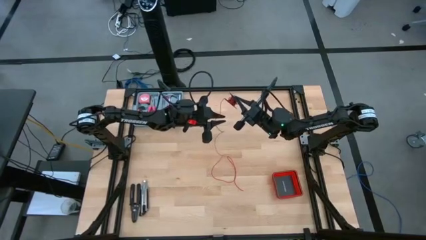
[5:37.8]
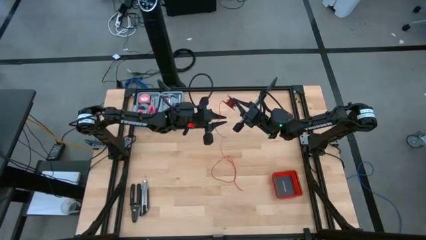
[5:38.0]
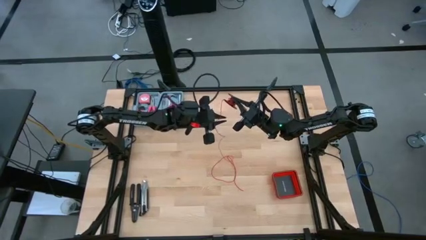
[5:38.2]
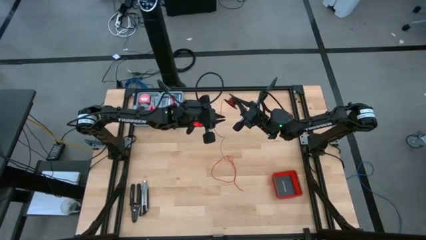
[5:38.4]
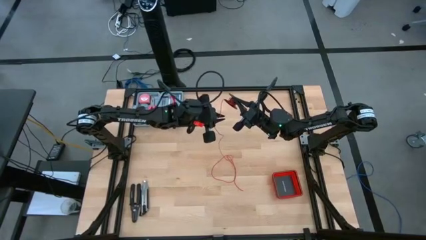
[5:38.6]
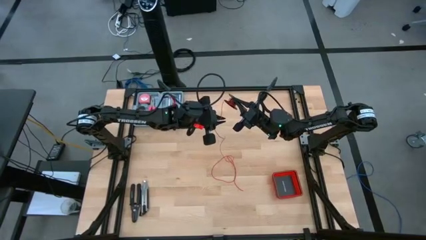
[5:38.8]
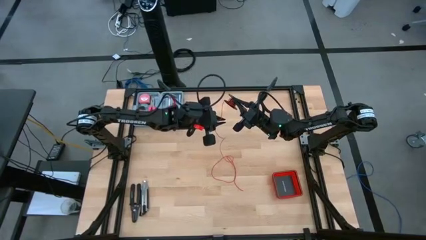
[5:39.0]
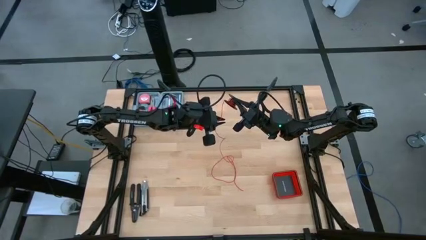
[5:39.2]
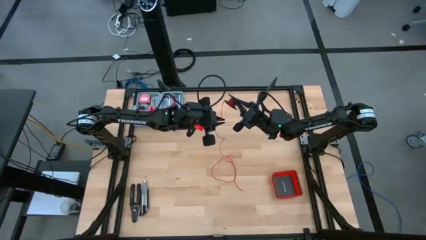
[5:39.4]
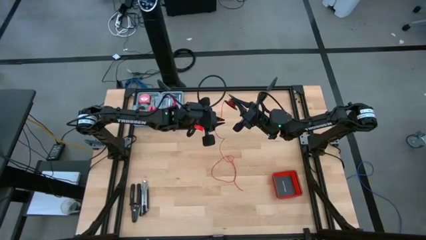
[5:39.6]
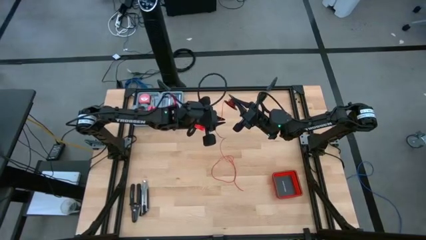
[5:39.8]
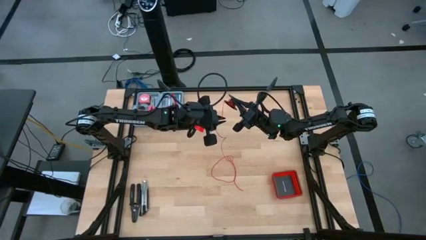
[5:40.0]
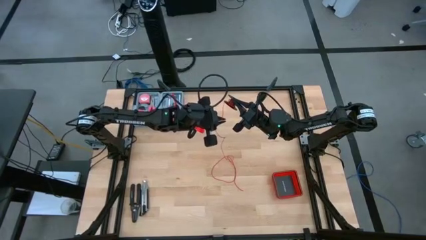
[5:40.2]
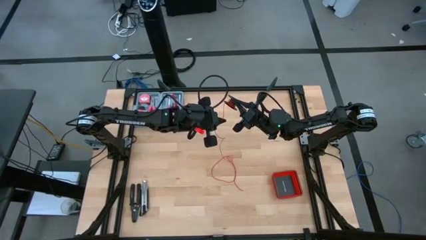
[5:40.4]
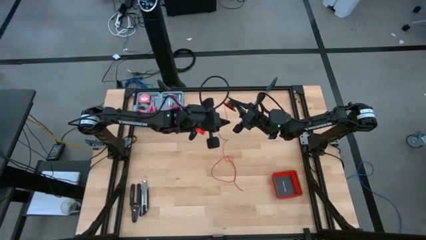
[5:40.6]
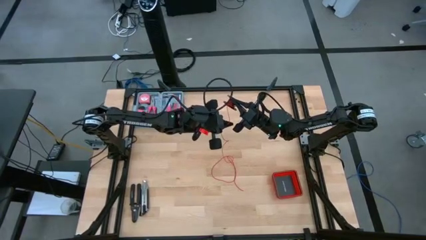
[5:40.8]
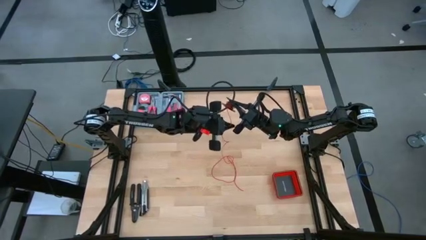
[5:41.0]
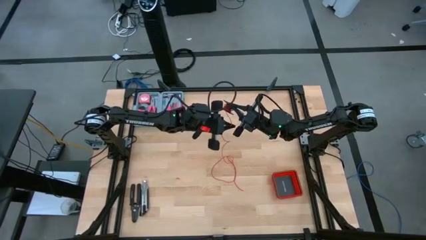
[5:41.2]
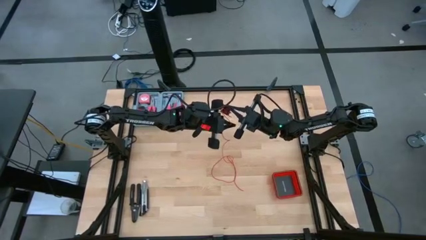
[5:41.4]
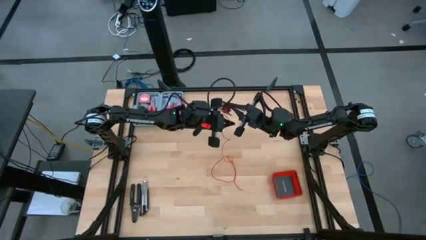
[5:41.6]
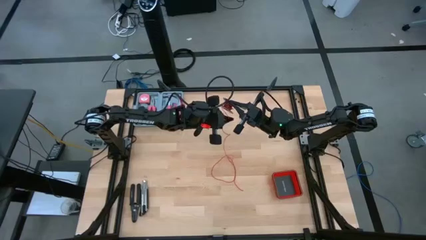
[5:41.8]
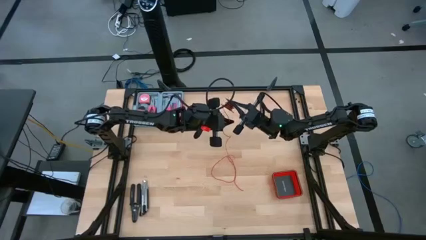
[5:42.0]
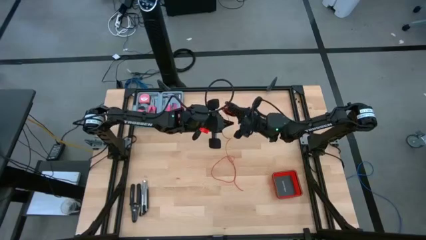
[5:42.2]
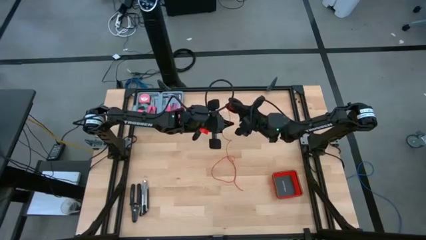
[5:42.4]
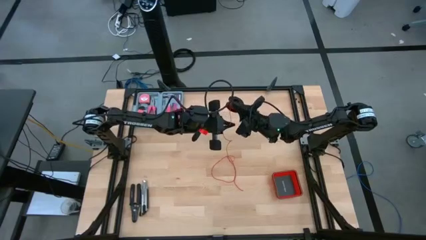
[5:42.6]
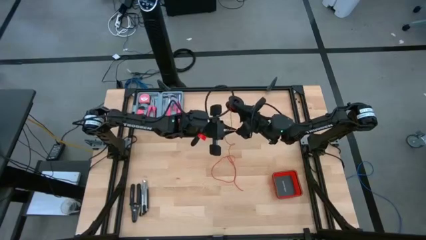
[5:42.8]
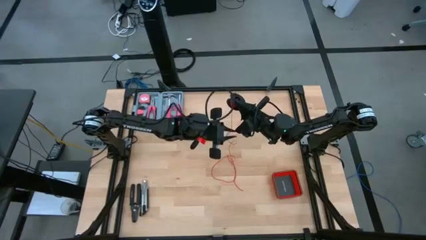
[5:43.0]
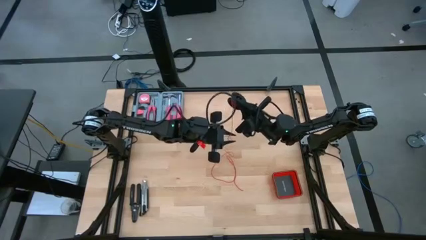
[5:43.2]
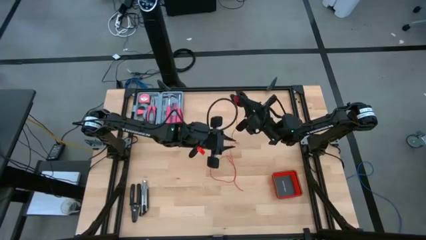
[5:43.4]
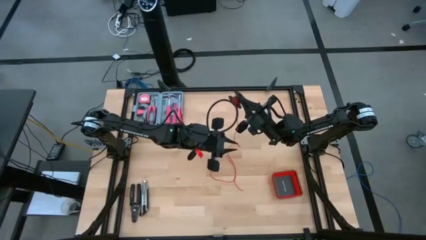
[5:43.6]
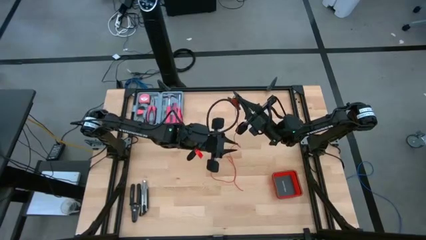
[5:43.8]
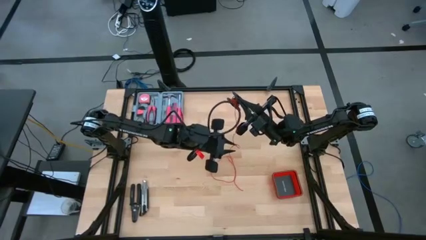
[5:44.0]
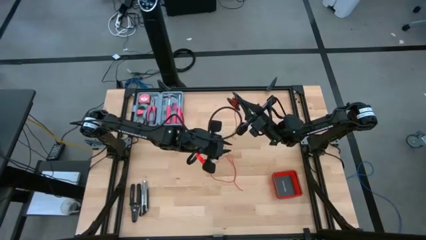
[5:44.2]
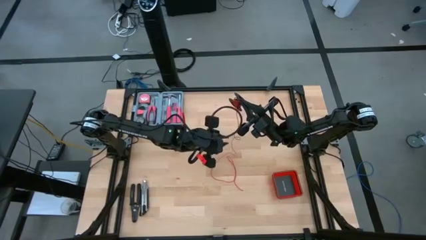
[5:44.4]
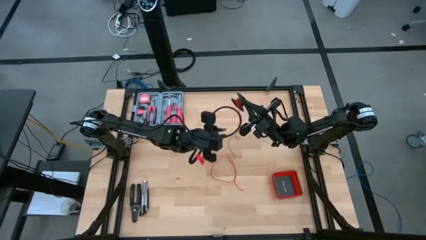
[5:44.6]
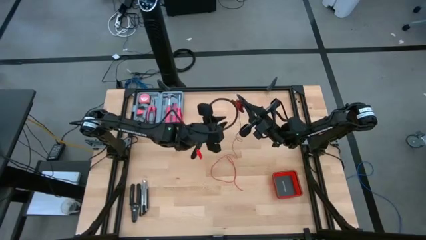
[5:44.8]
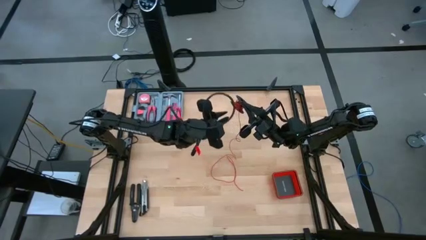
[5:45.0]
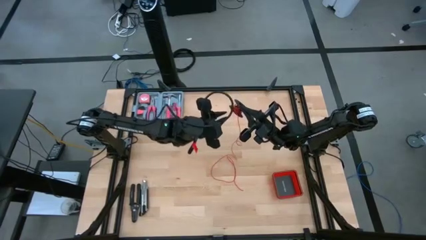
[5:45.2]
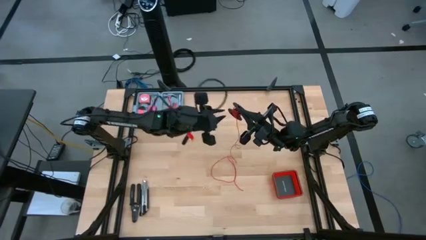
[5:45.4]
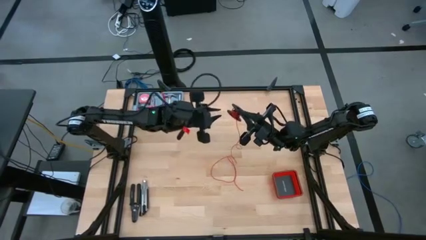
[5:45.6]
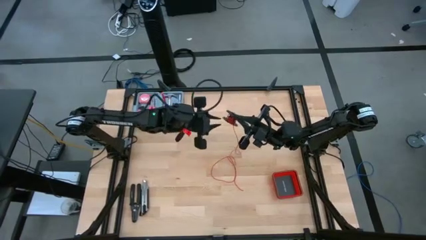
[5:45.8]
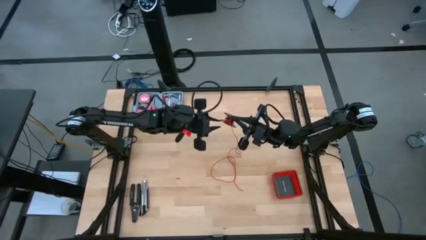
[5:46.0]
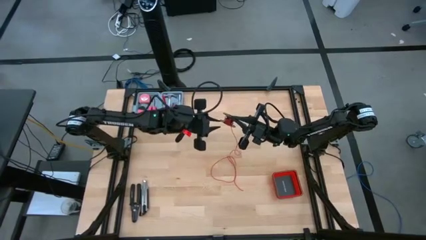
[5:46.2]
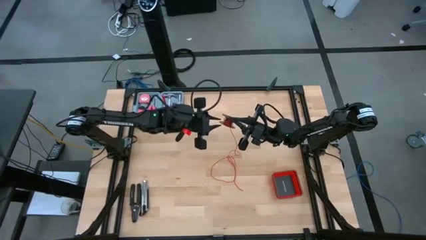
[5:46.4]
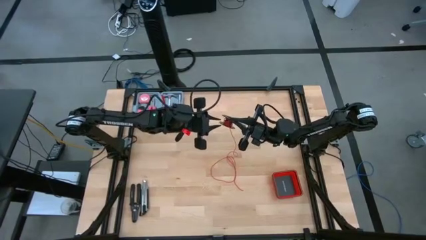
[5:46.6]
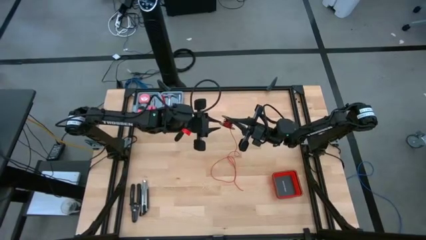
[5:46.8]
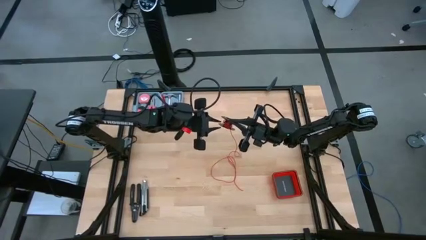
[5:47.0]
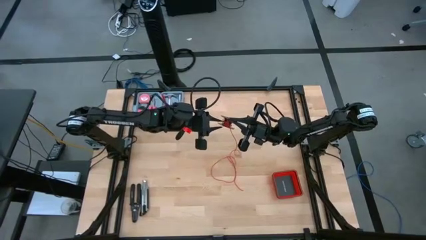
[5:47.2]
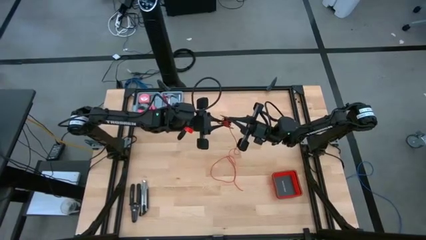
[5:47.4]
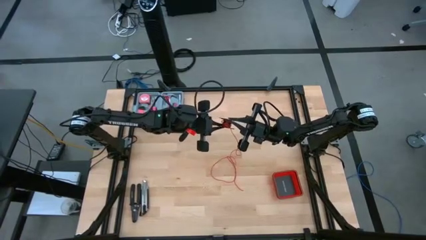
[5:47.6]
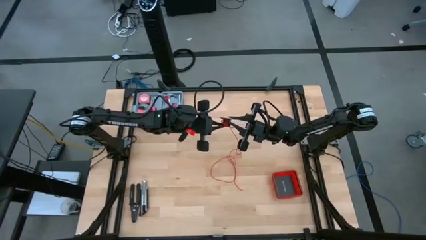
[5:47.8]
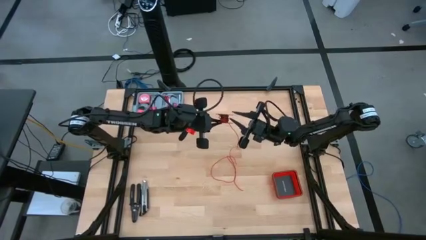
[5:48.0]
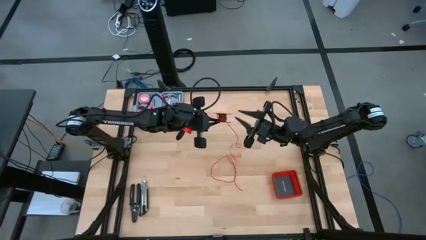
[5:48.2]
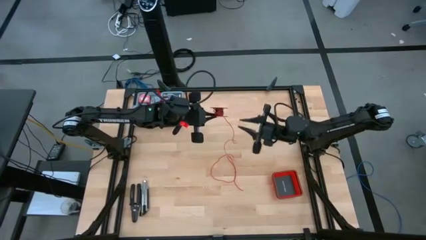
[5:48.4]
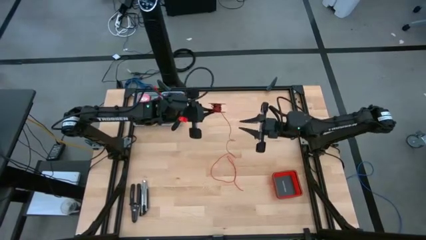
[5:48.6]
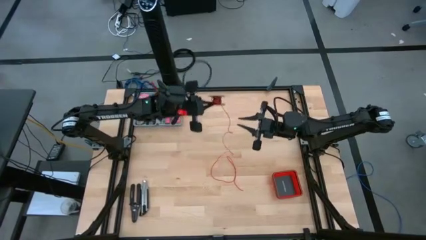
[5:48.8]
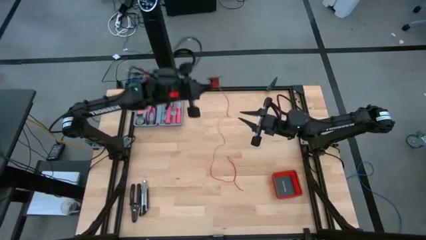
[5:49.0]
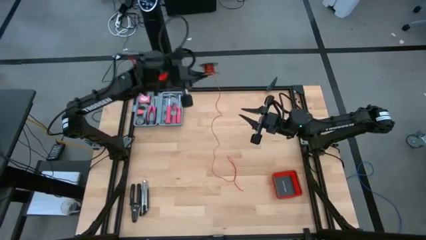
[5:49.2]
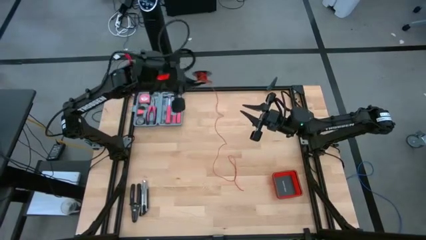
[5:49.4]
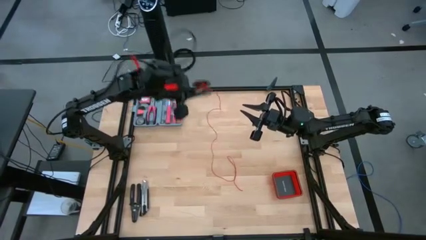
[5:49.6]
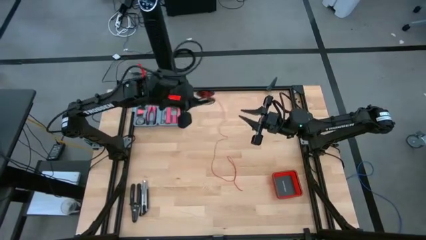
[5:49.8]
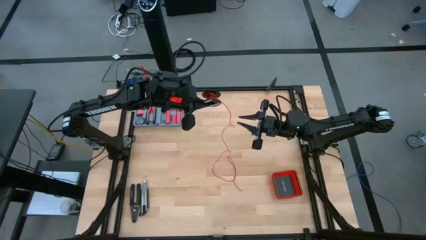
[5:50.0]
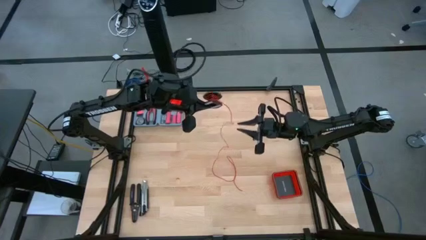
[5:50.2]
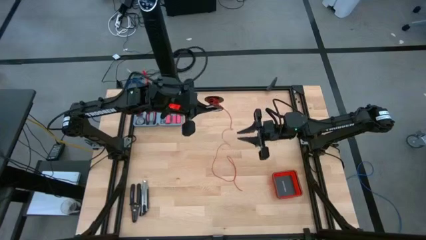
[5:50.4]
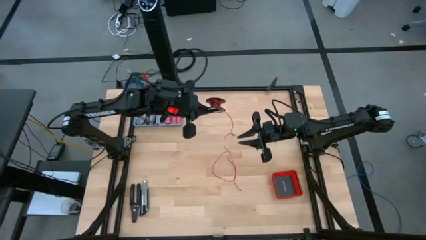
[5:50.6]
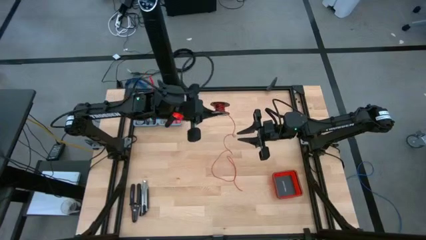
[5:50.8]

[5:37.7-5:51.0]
Task: Coil cords
Coil the red wire onto the spool

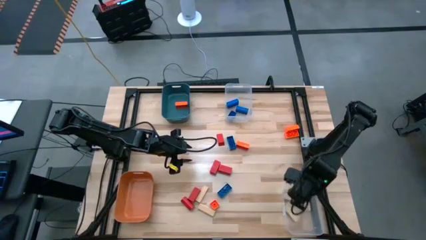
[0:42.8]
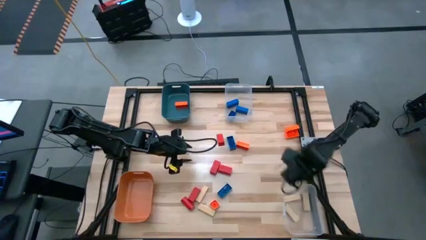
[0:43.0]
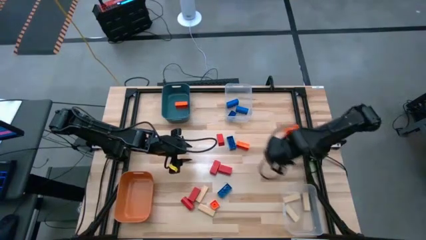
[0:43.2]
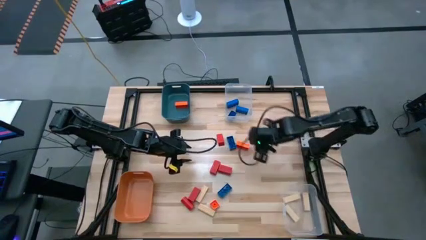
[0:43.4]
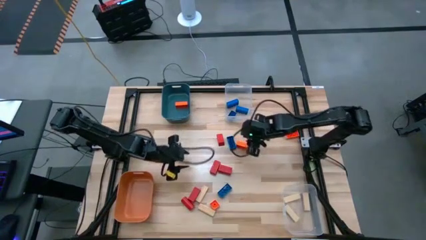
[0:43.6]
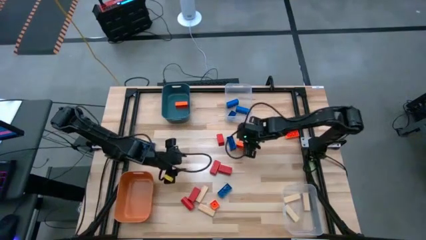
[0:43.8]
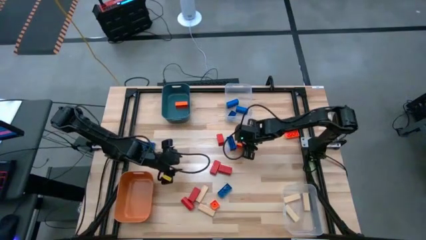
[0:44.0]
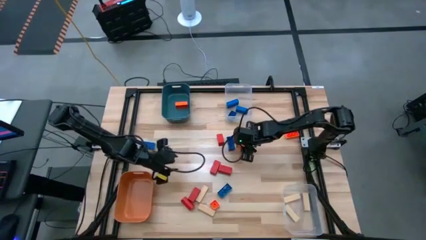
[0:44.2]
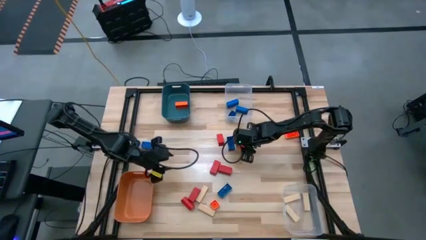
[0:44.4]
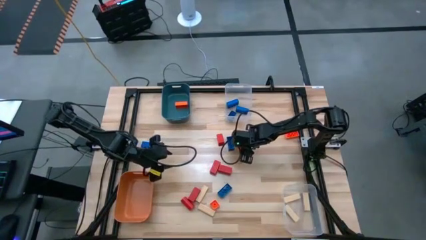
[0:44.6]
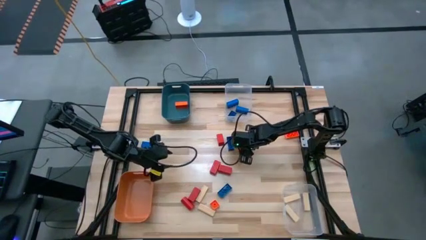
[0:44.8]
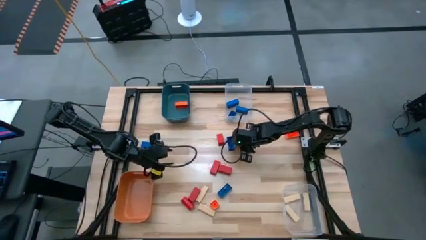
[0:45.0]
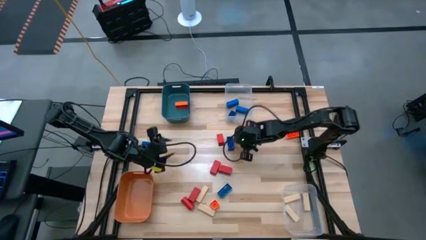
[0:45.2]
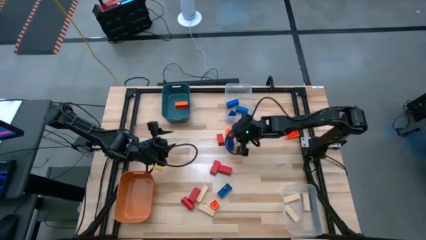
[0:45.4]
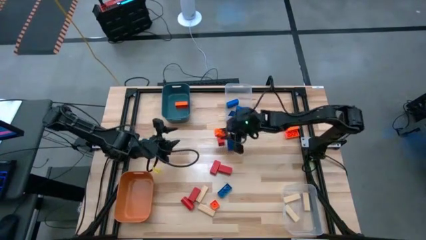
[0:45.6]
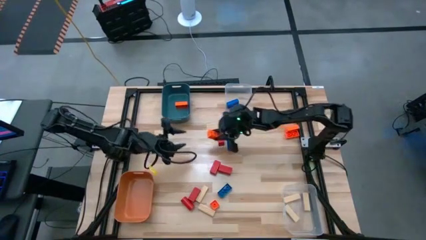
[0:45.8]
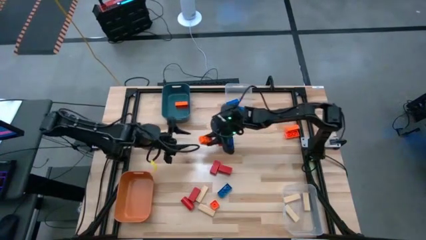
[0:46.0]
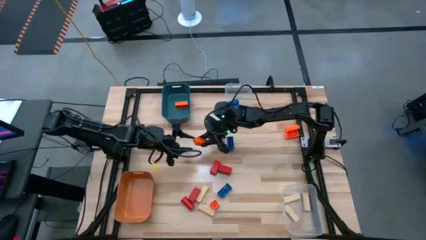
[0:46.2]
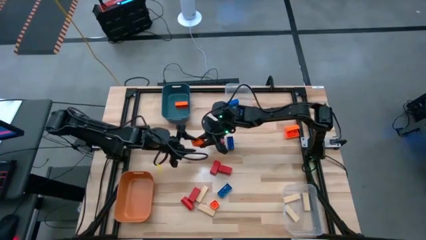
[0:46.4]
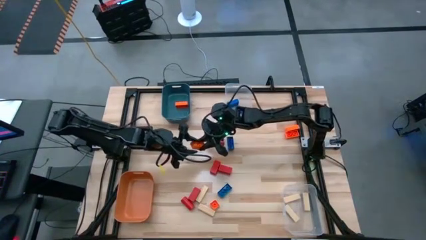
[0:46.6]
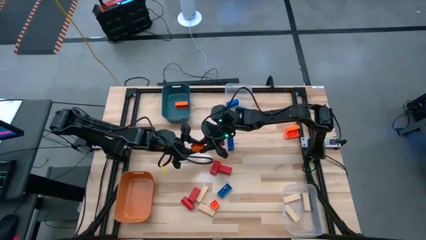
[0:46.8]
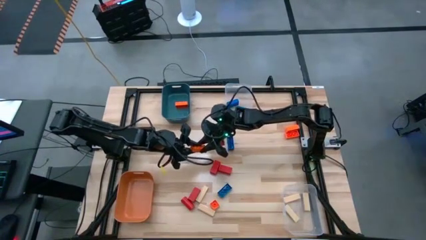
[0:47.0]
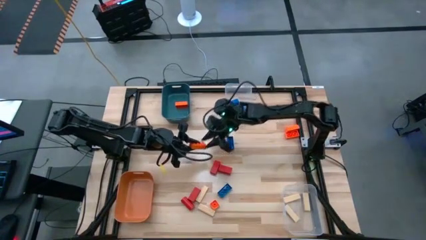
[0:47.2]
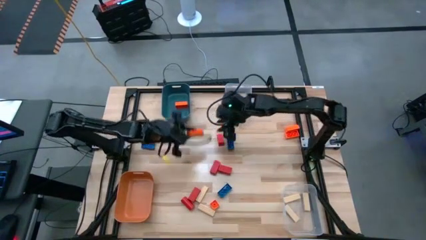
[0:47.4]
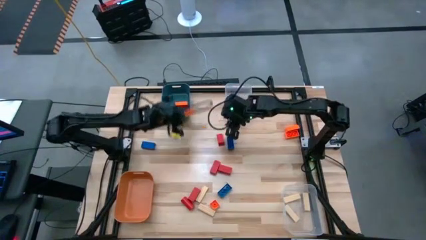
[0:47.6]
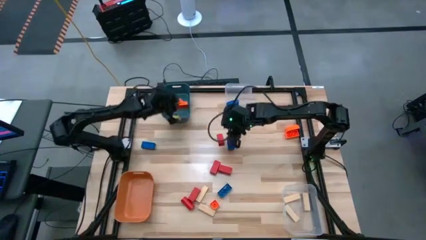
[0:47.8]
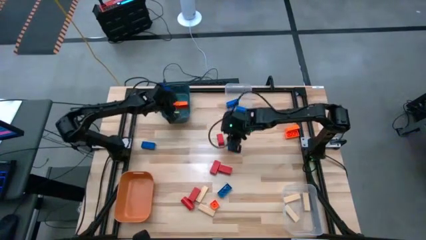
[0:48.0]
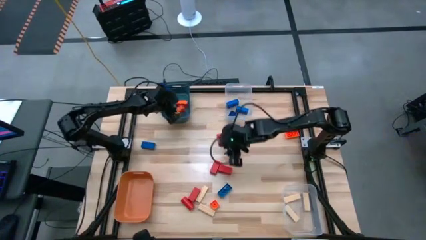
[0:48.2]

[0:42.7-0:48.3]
Task: Sort blocks
Put the orange game piece into the blue bin
